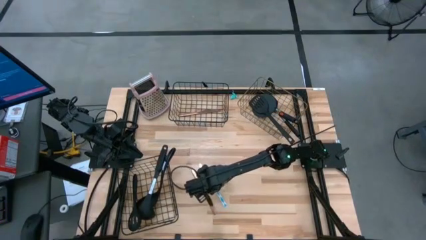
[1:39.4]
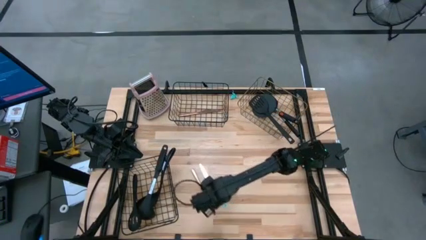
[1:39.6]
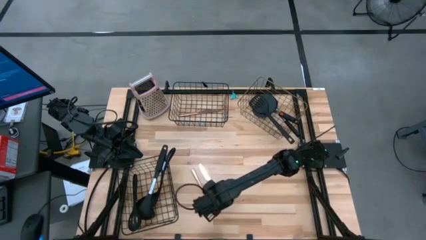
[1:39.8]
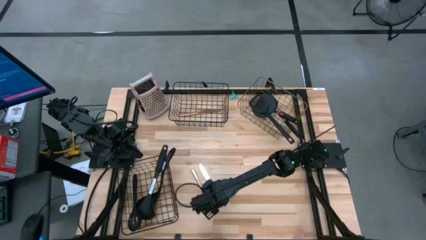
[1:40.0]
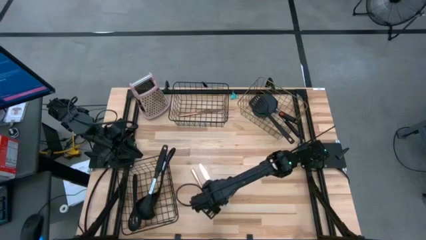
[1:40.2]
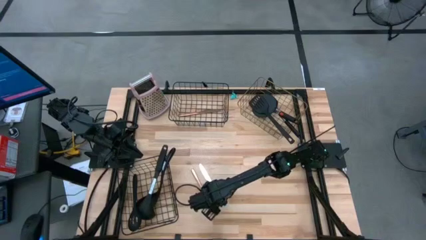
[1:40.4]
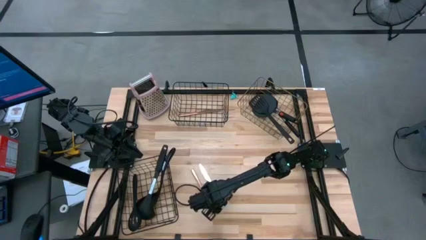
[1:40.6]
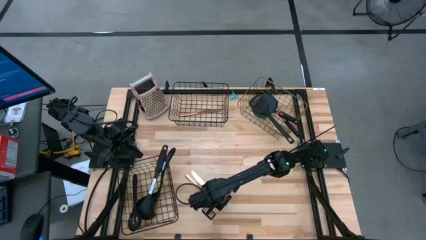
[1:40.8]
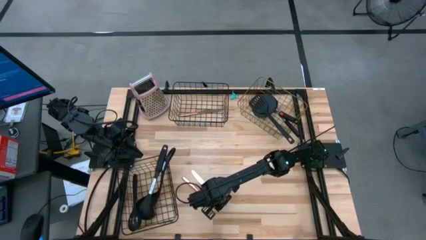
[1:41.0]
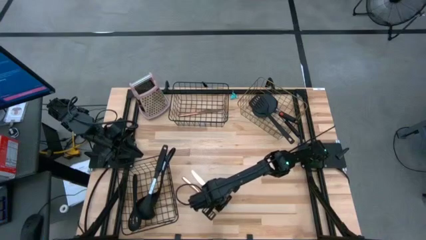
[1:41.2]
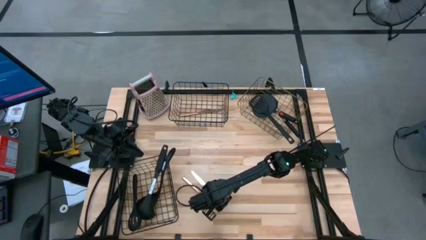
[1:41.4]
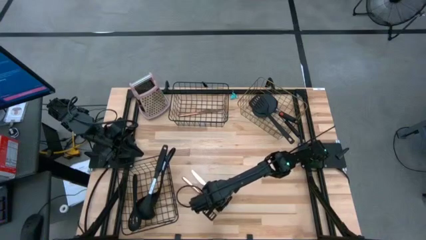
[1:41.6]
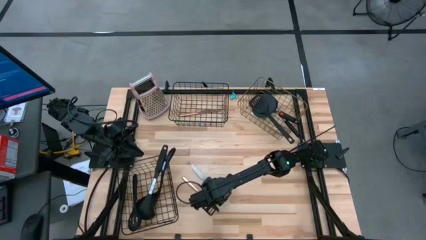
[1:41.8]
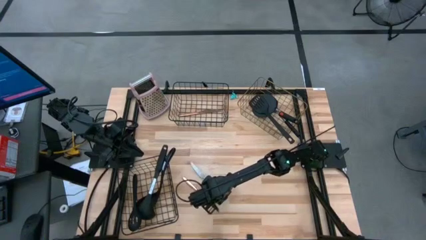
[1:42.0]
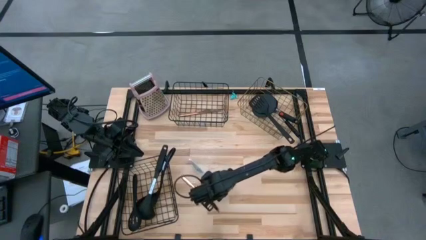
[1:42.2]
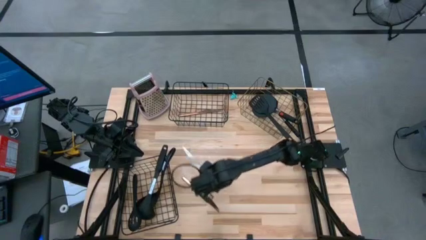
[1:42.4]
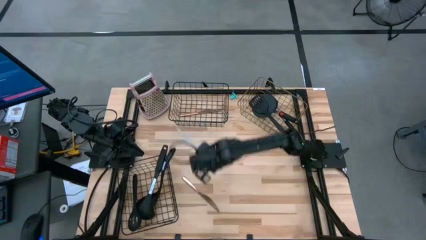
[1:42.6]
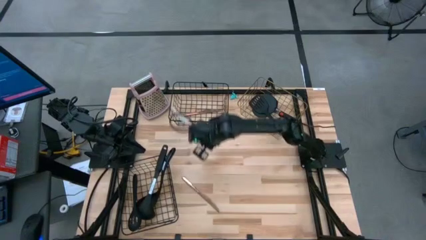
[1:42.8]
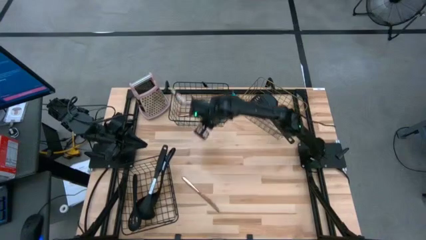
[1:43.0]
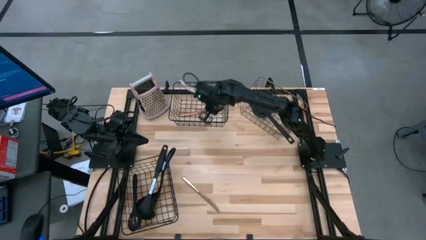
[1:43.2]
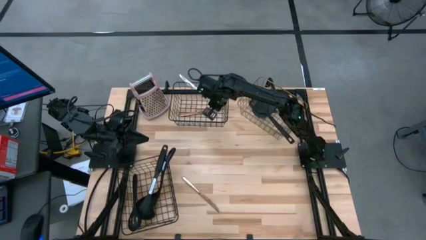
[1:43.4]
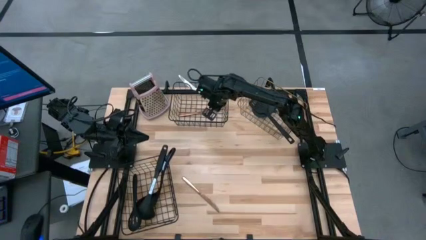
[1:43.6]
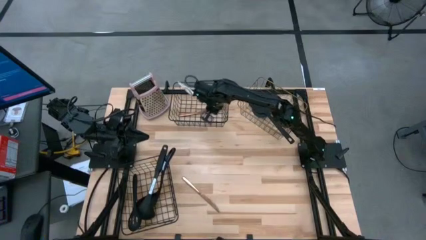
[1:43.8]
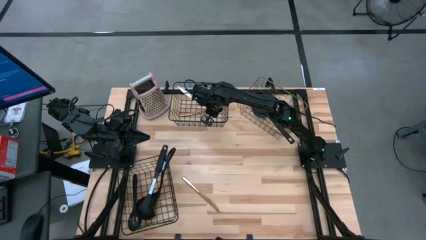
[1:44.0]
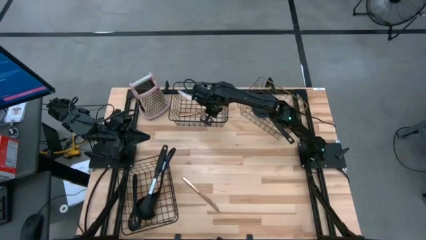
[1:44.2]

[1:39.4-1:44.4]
Task: Pick & Place Kitchen Items
Put the blue knife into the top black wire basket

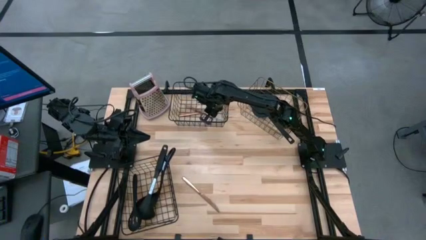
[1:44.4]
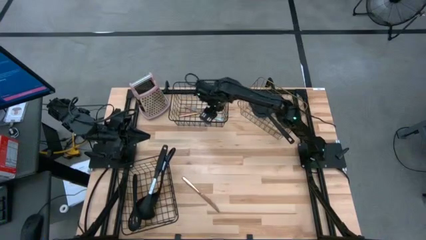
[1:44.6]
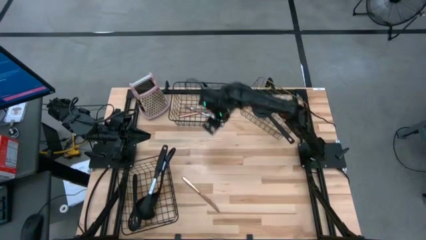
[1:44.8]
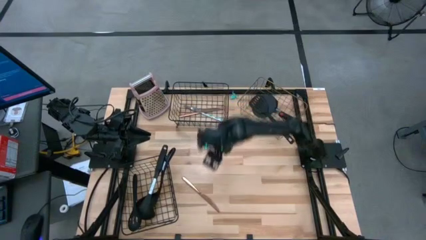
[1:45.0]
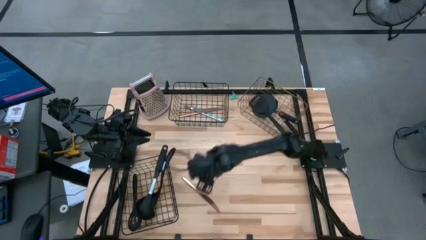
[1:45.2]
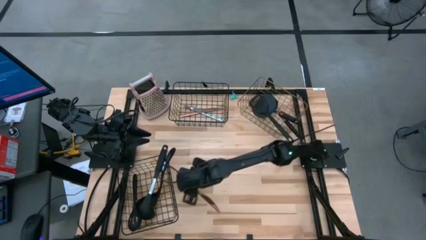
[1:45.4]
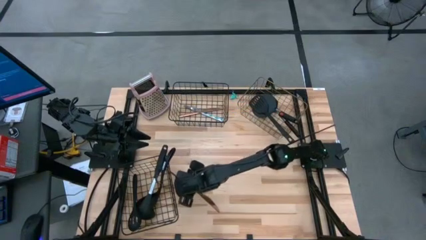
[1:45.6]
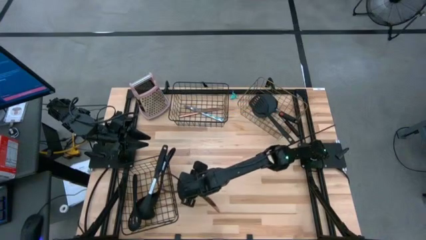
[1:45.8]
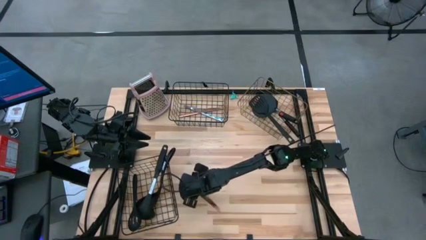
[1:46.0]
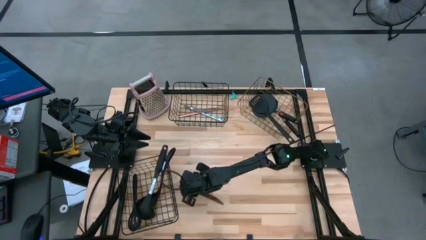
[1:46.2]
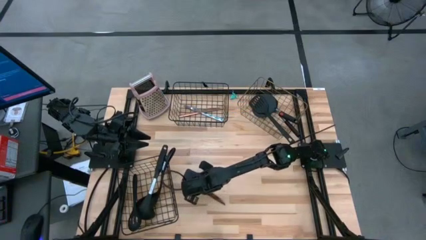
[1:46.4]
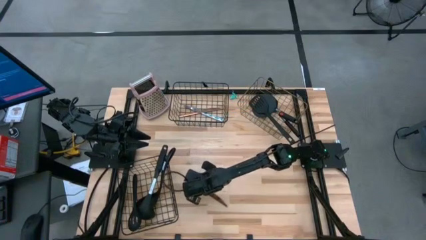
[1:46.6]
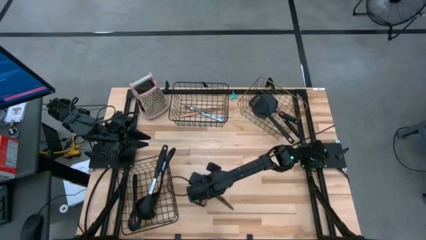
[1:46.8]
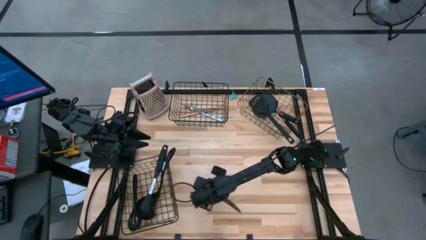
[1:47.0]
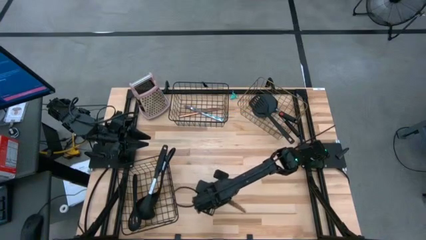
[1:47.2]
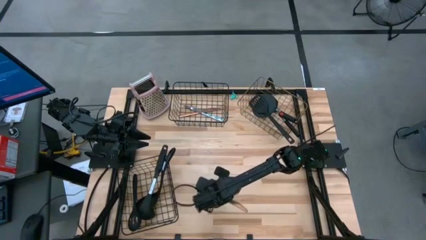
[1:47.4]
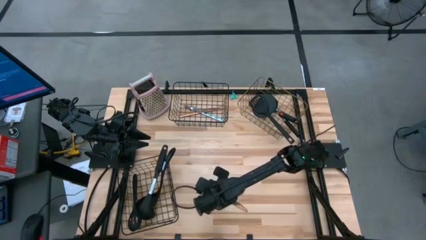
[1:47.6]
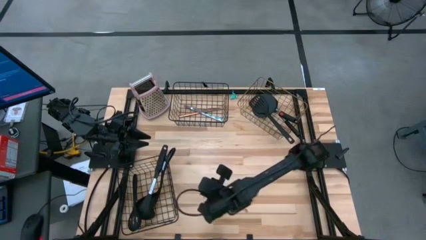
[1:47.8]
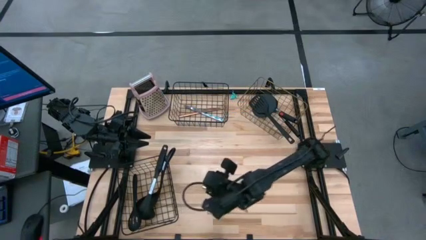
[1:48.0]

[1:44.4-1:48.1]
Put the brown knife into the top black wire basket

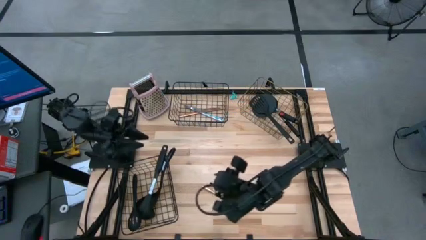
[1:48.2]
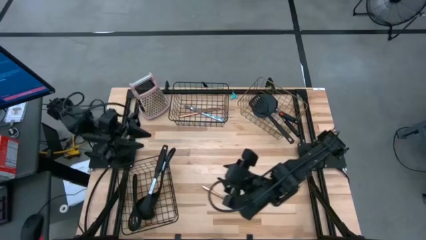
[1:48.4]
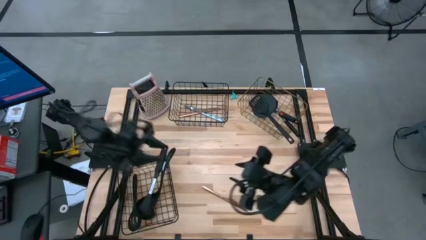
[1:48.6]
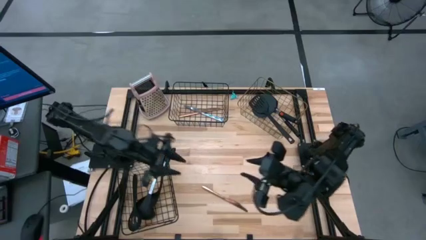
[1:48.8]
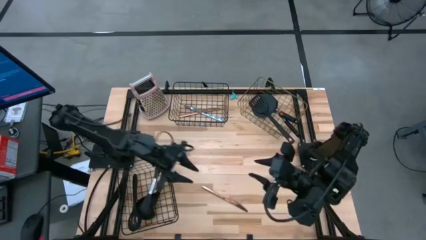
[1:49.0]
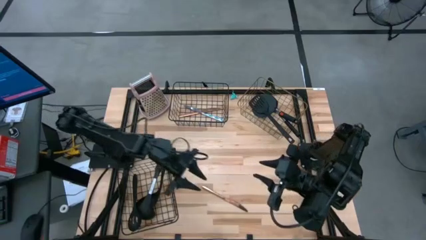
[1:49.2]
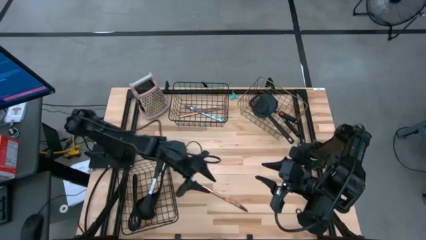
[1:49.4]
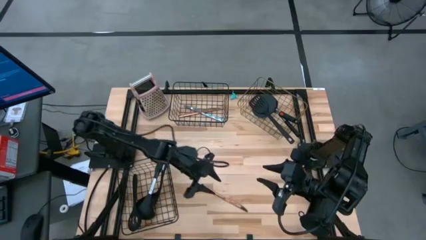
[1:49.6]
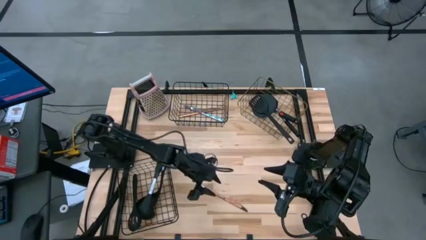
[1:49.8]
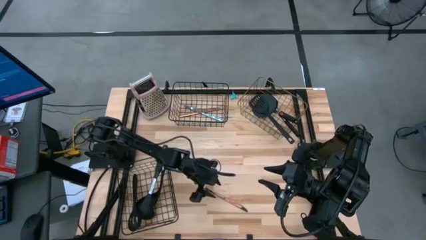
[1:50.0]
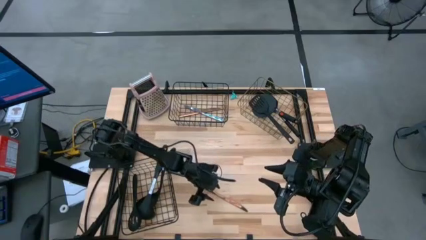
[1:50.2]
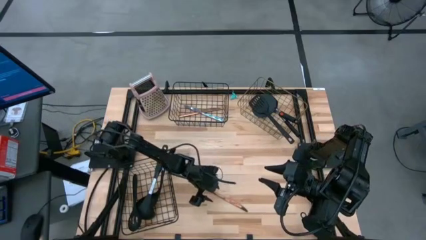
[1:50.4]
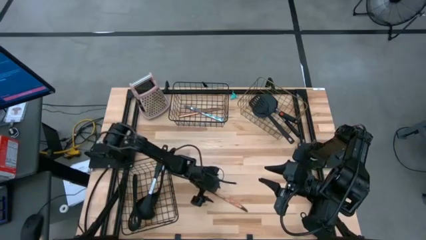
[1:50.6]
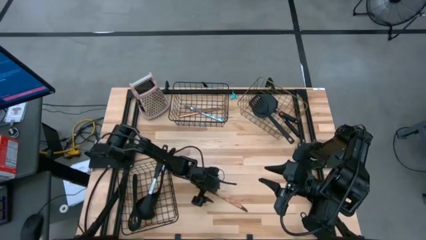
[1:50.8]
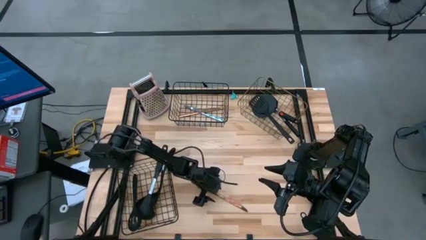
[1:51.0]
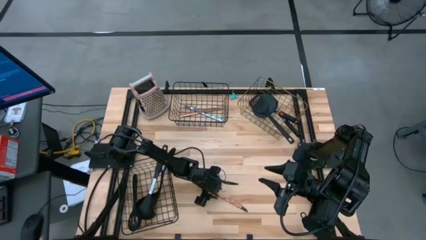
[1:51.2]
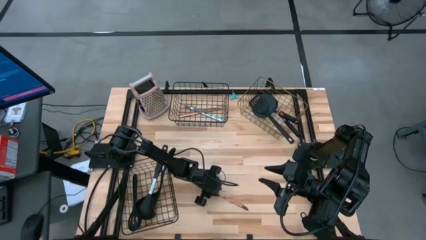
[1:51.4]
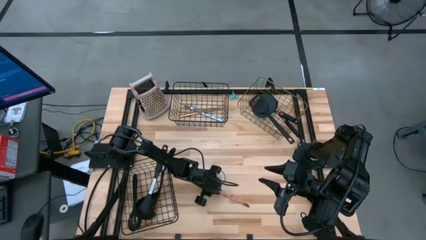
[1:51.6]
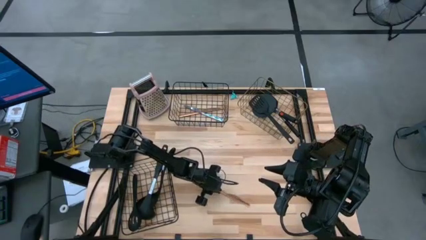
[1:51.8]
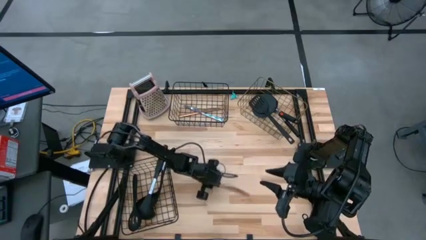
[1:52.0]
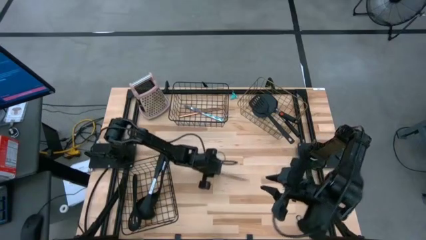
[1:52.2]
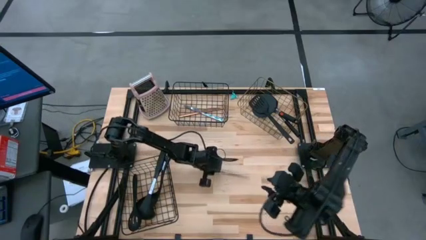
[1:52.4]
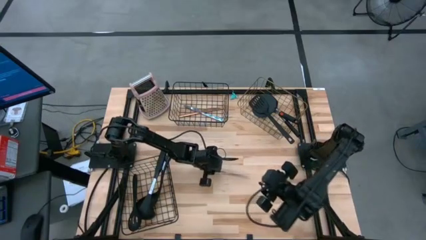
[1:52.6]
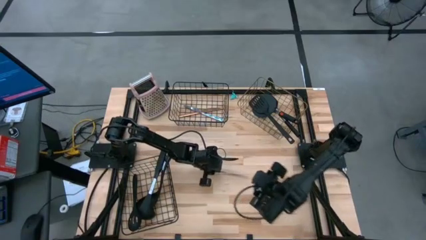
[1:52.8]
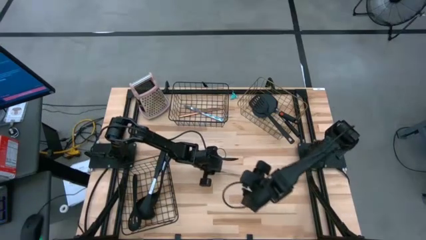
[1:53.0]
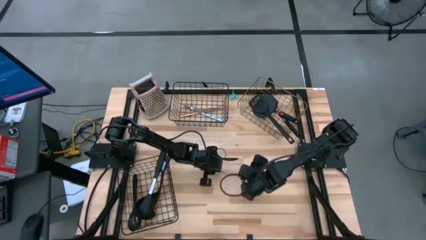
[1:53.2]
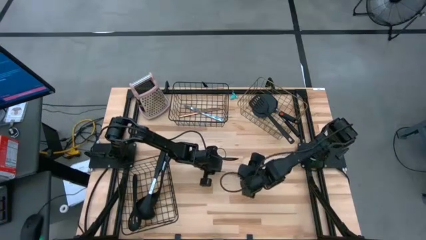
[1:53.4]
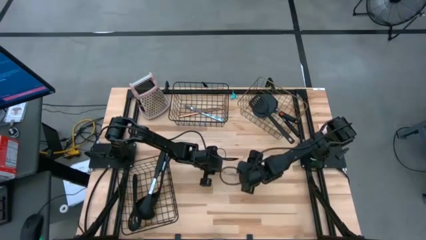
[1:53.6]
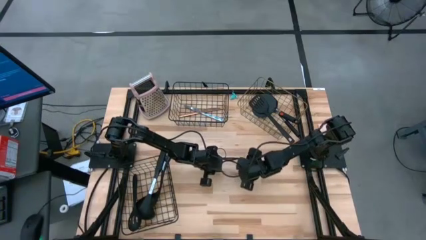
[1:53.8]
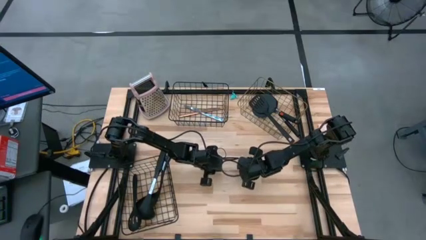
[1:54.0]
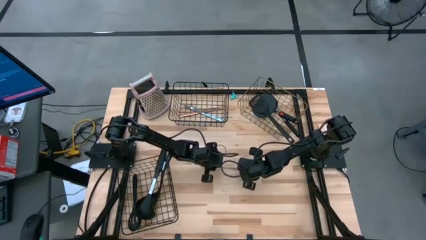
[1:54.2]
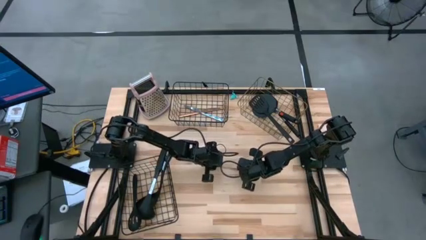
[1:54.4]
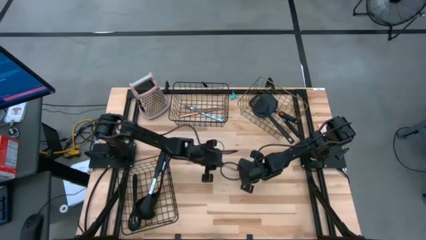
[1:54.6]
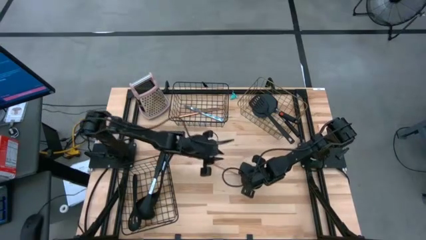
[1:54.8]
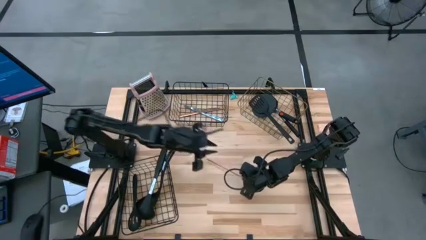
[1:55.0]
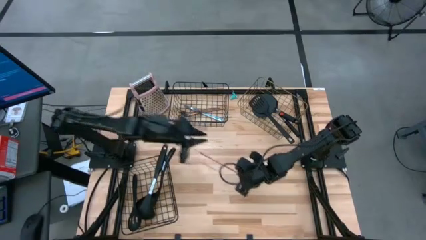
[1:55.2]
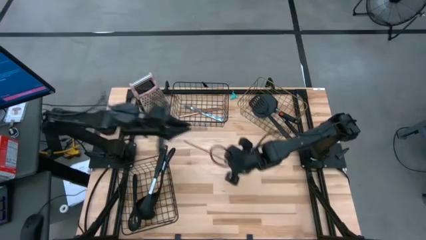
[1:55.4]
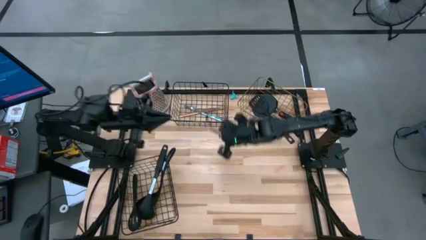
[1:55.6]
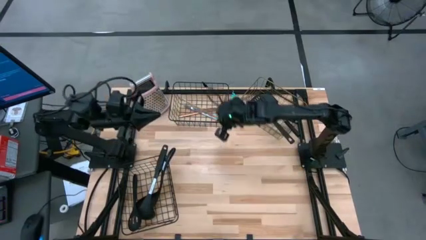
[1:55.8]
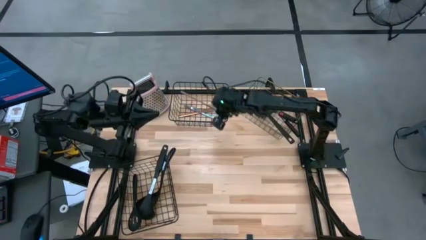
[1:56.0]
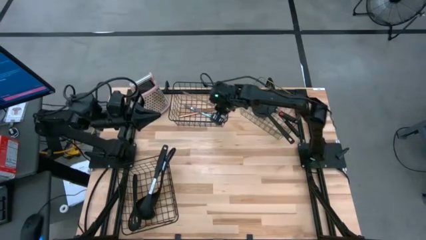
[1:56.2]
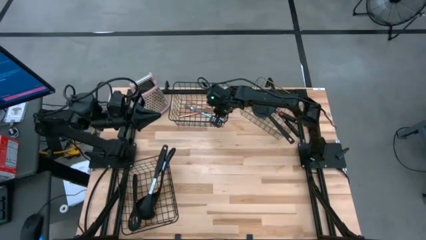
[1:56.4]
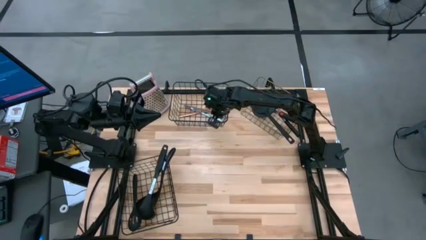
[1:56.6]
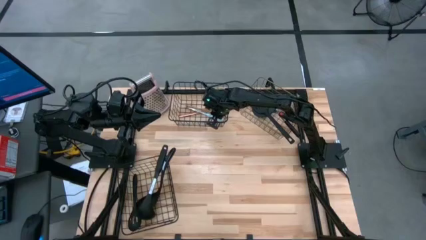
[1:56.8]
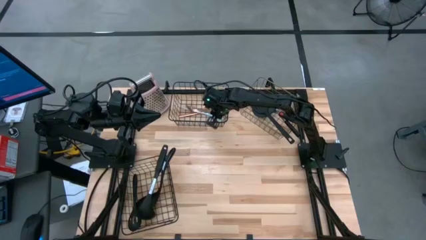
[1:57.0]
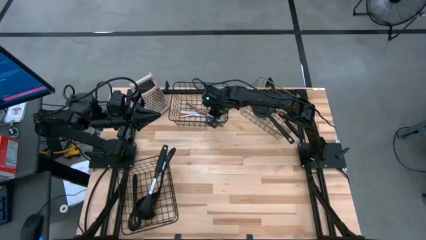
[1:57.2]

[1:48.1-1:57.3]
Put the brown knife into the top black wire basket
